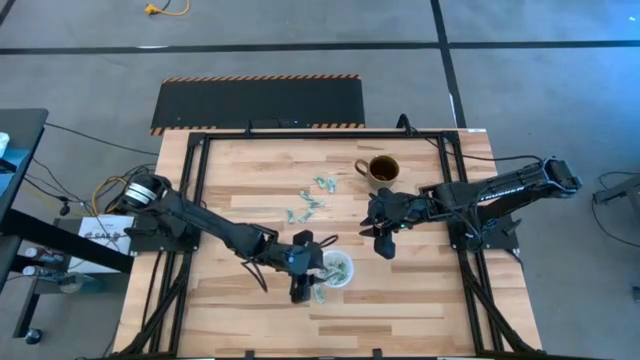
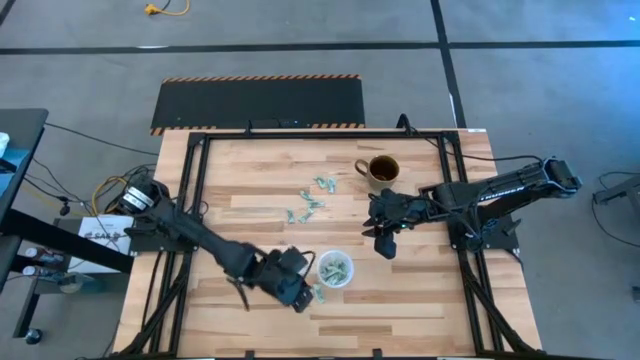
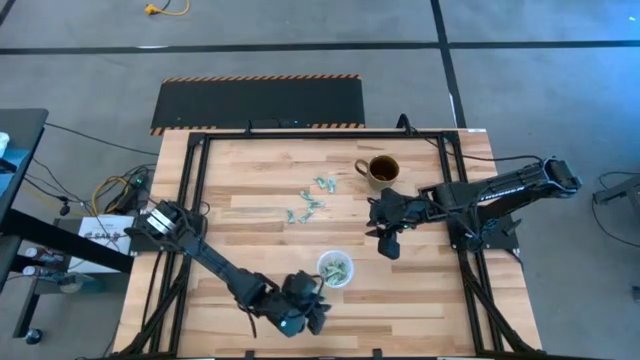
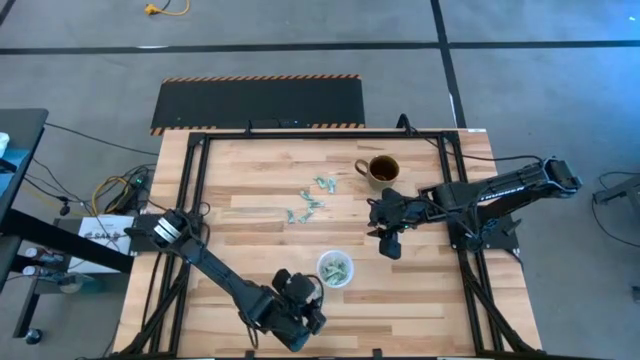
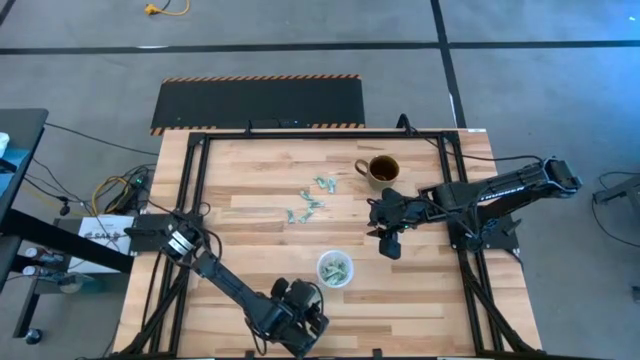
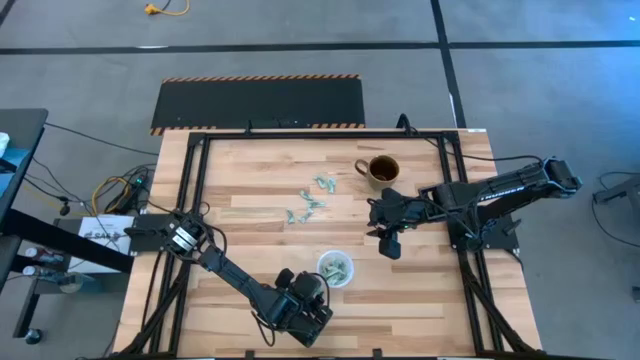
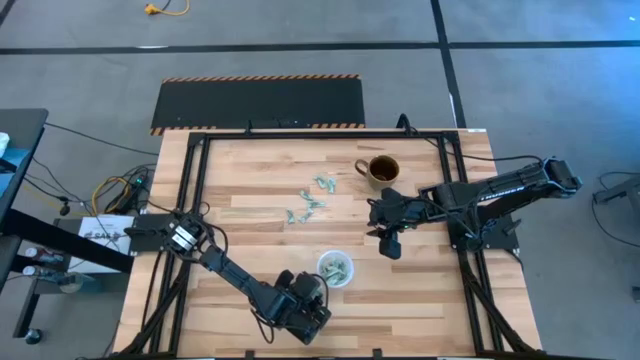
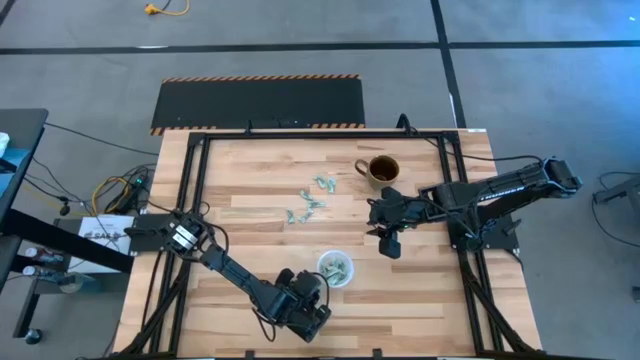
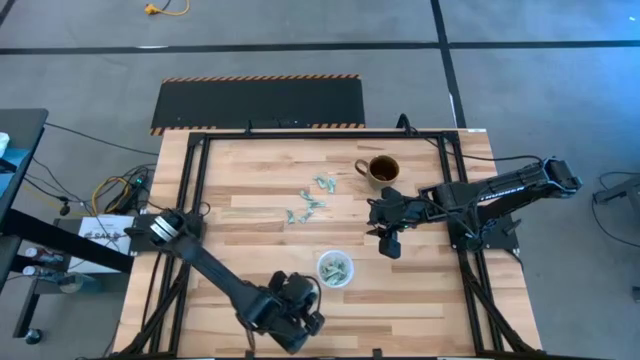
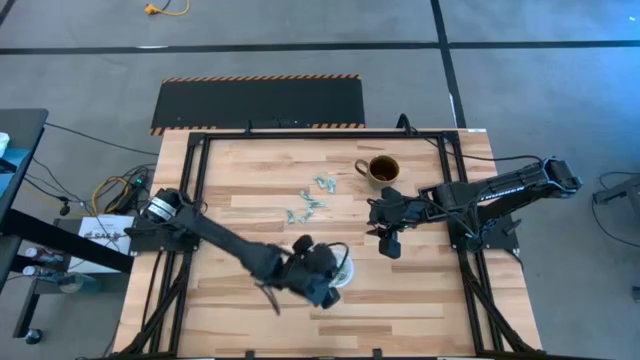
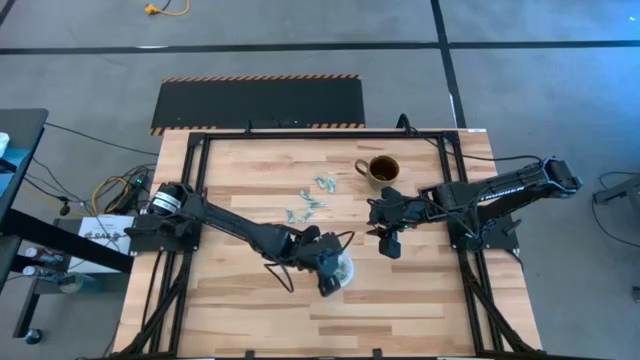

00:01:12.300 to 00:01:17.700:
Task: Pick and place Stevia / Truvia into bins
Put the green stevia packet into the transparent container

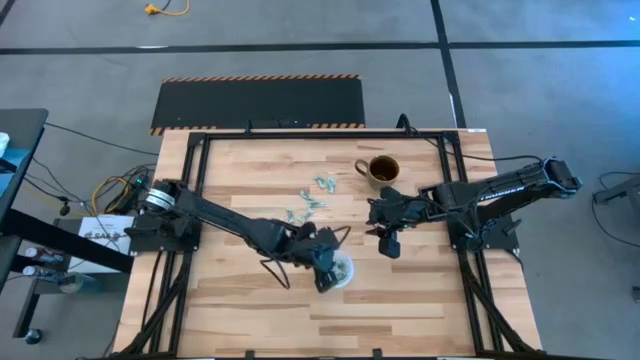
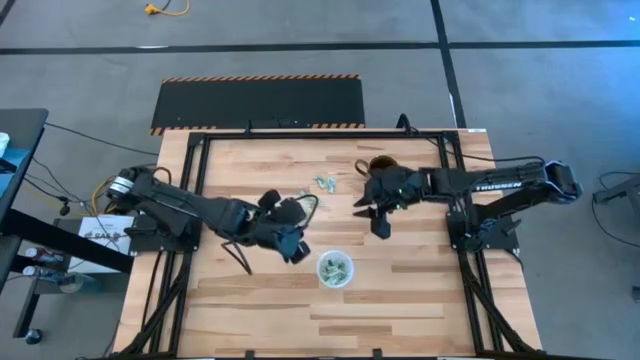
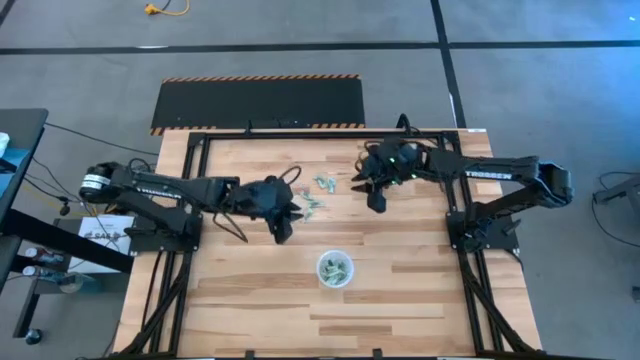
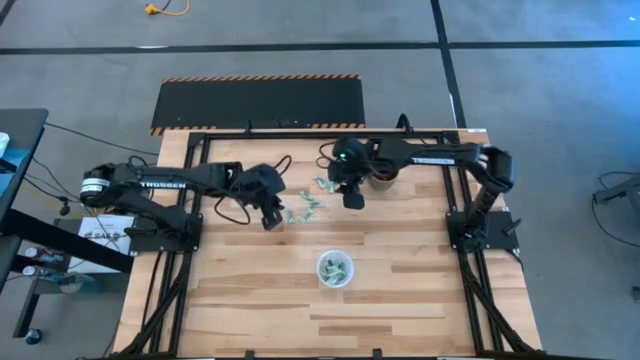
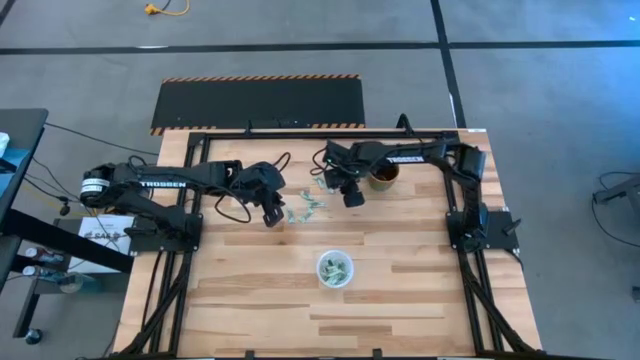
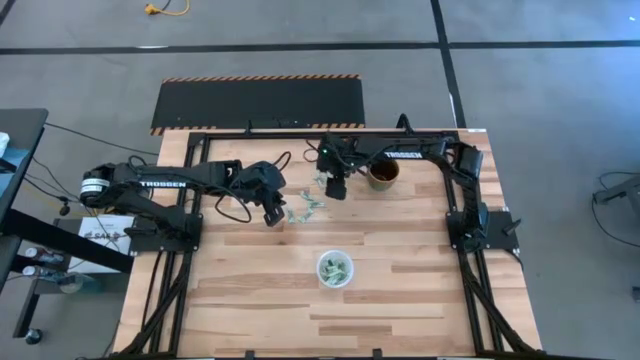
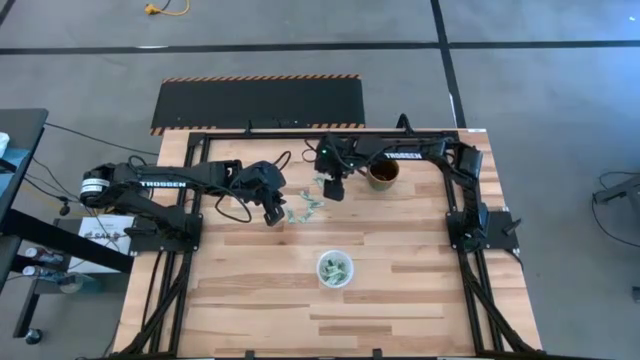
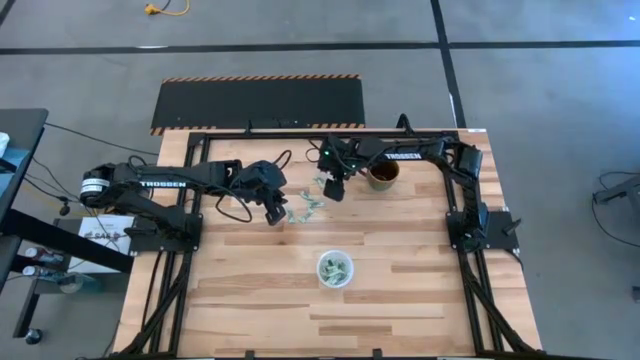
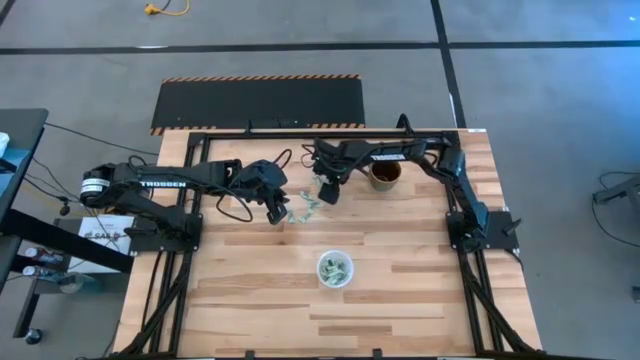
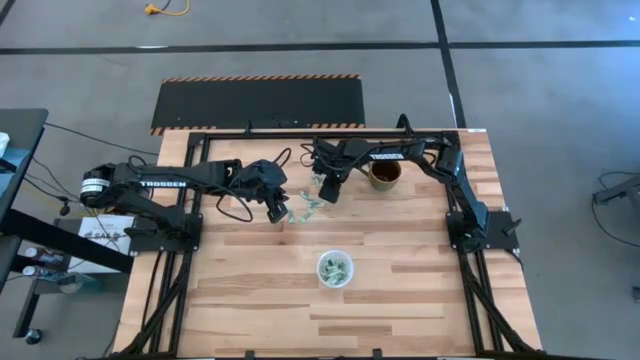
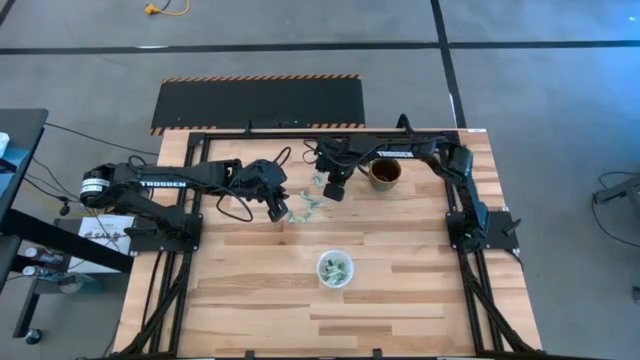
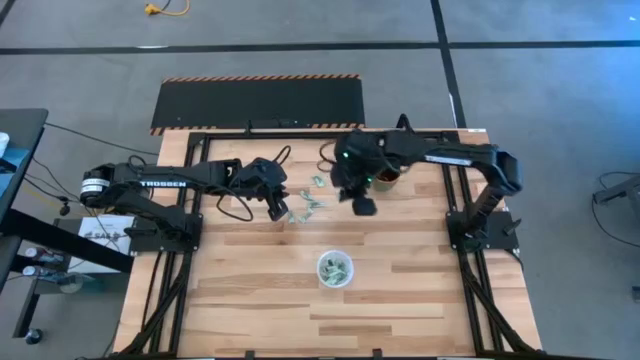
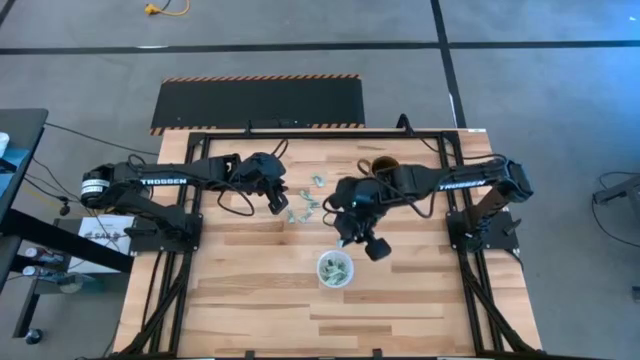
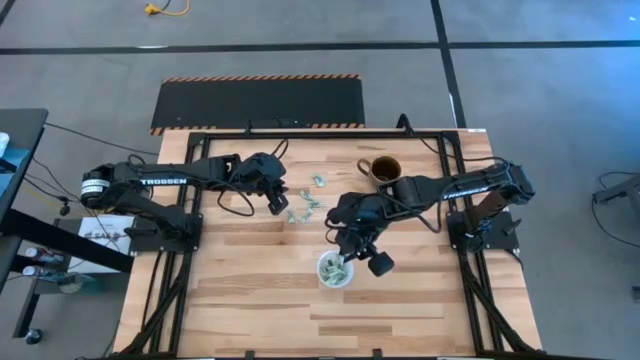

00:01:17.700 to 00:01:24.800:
Put the green stevia packet into the transparent container

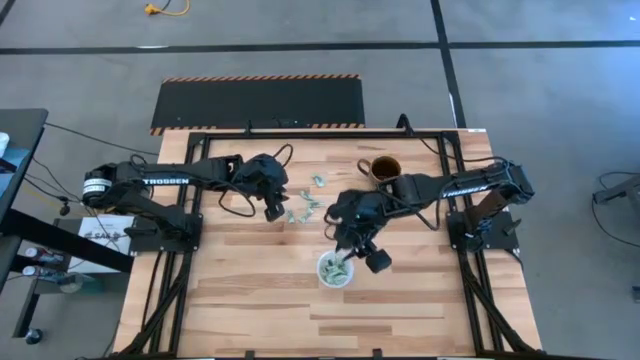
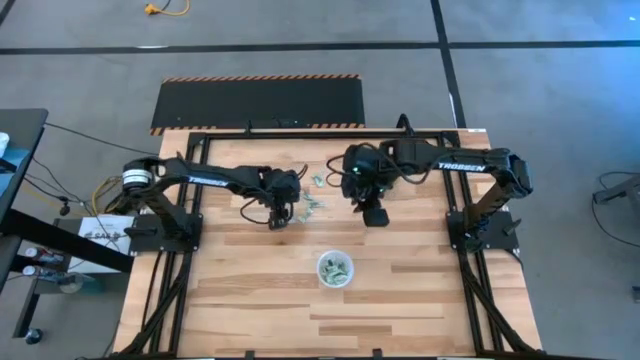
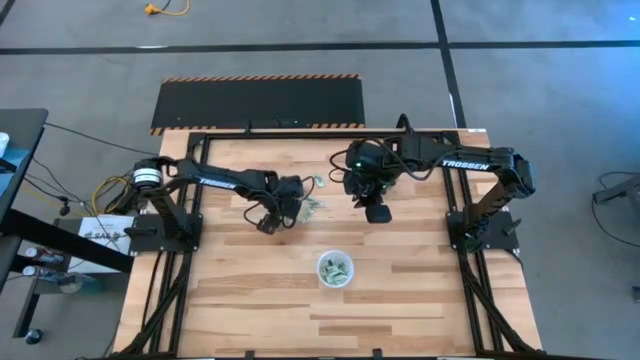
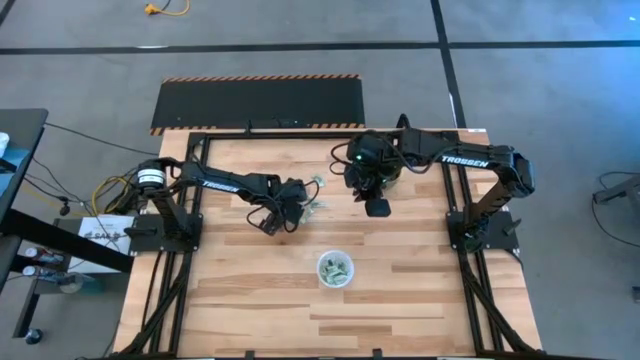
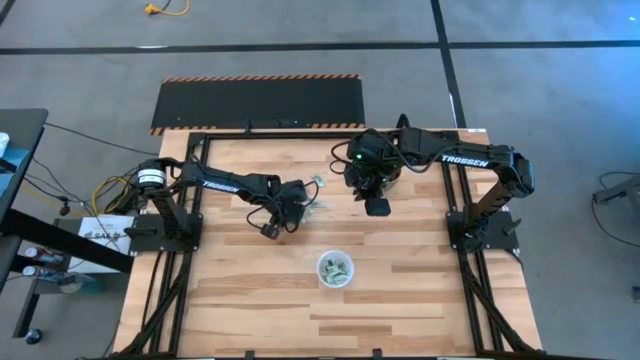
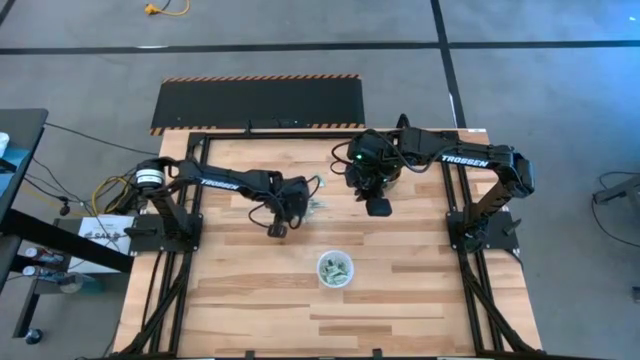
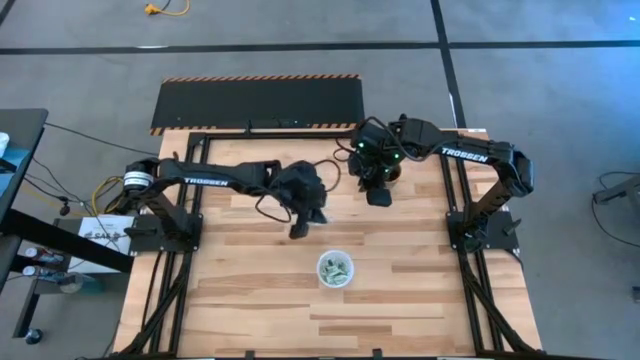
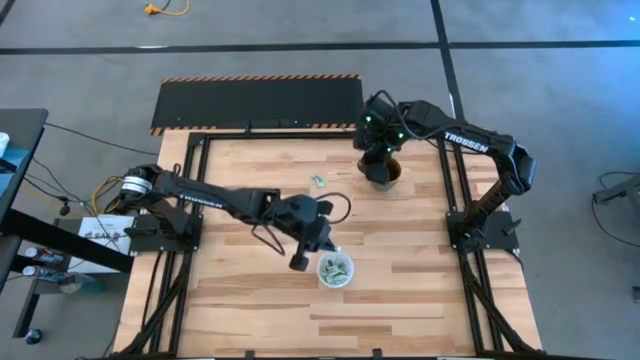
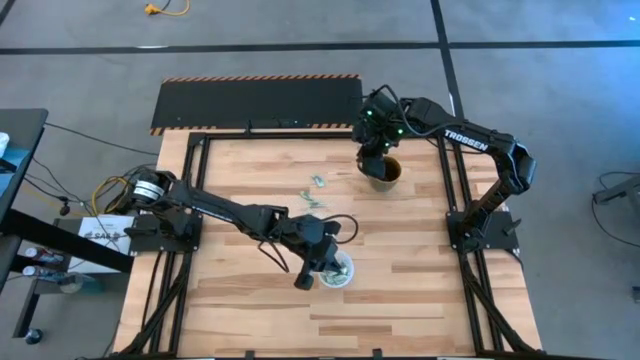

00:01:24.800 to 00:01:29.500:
Put the green stevia packet into the transparent container

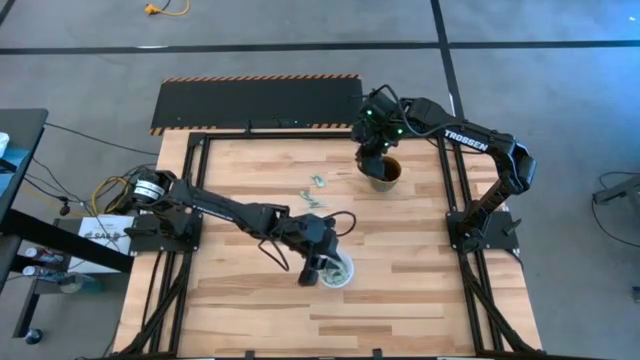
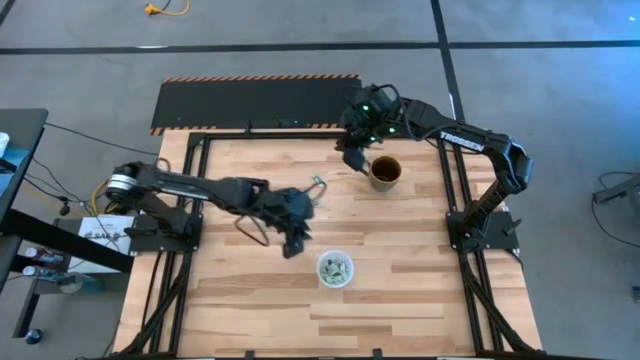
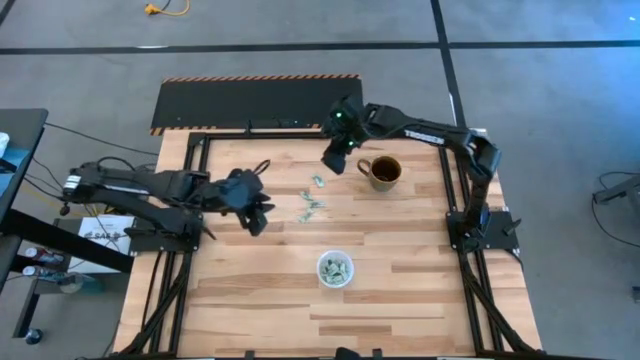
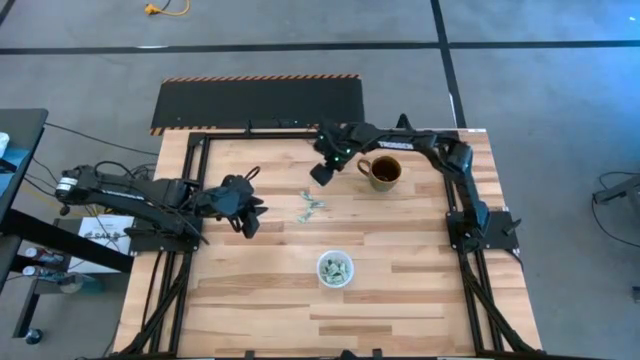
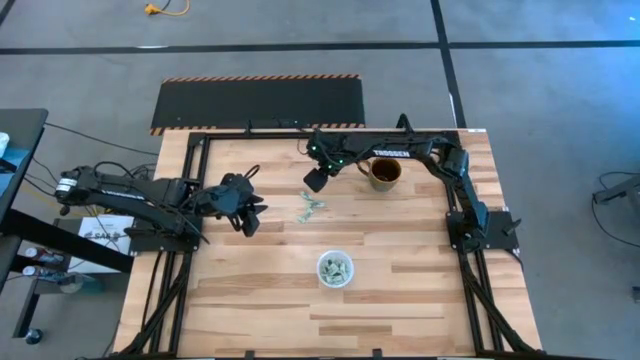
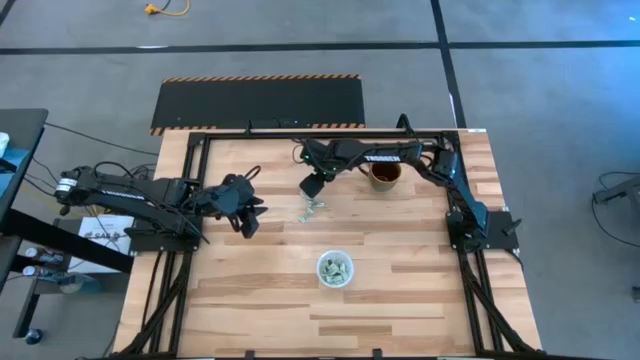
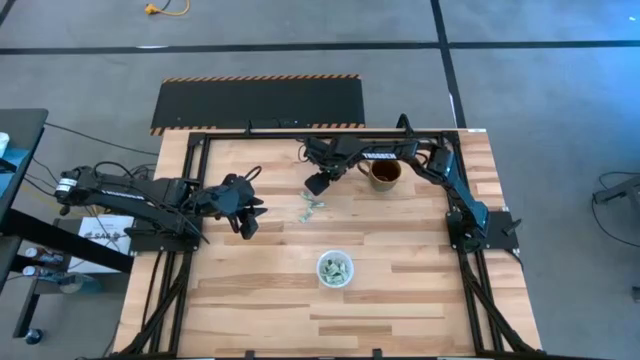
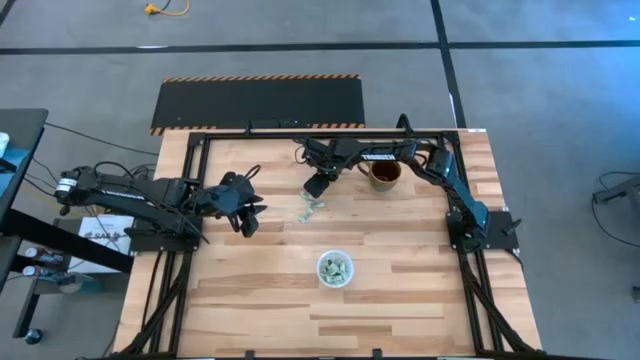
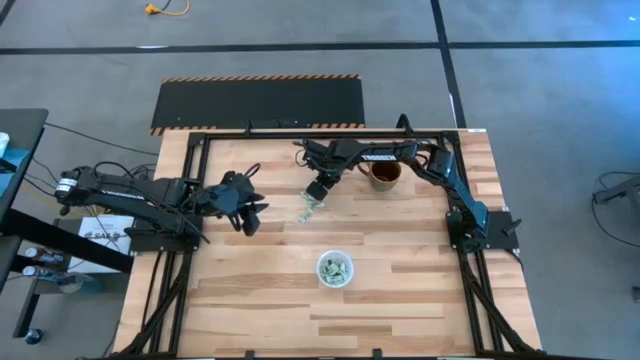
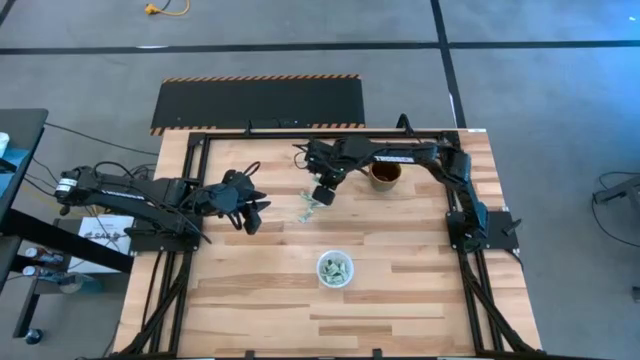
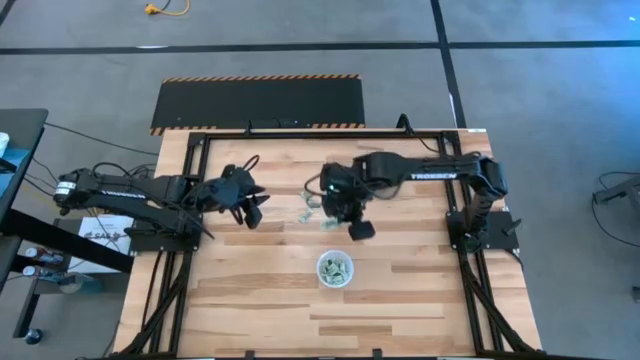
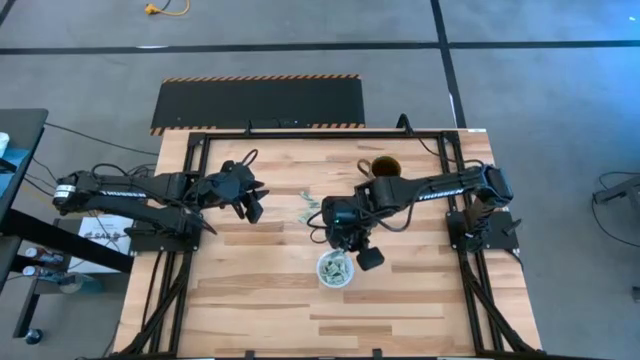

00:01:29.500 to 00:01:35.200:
Put the green stevia packet into the transparent container
